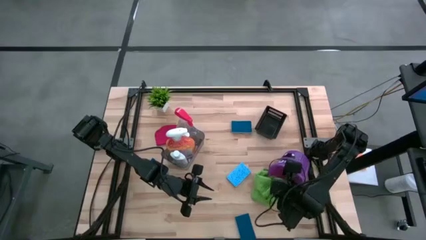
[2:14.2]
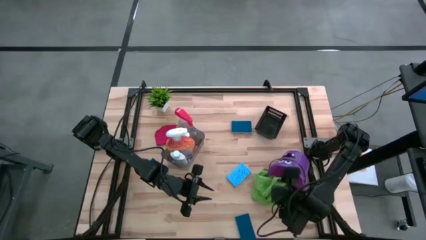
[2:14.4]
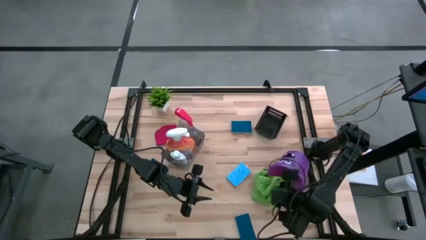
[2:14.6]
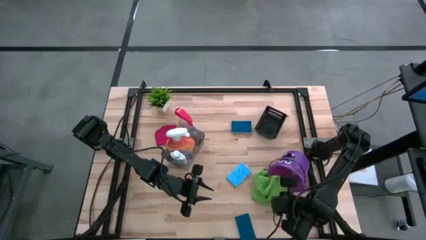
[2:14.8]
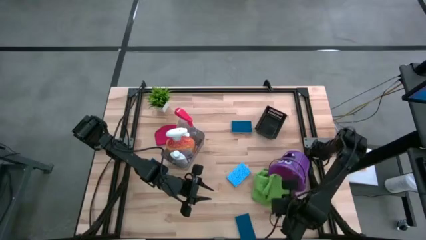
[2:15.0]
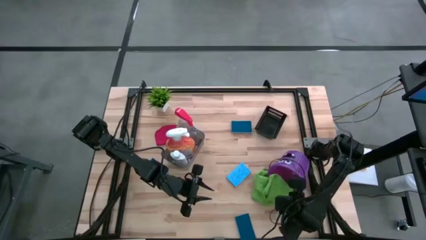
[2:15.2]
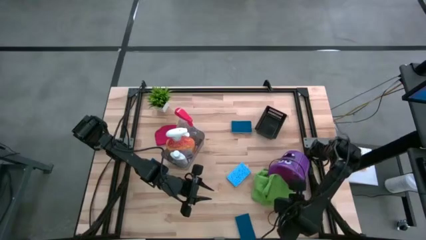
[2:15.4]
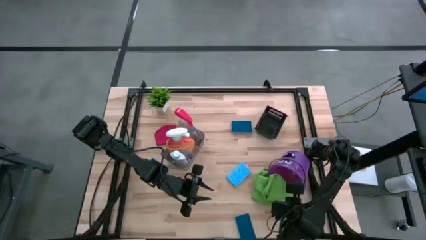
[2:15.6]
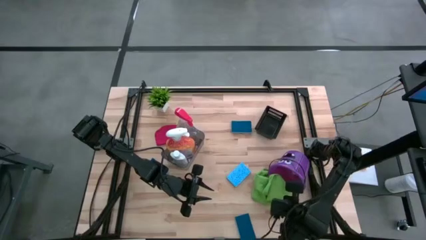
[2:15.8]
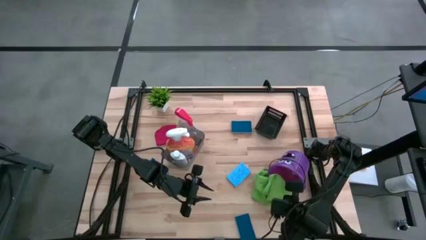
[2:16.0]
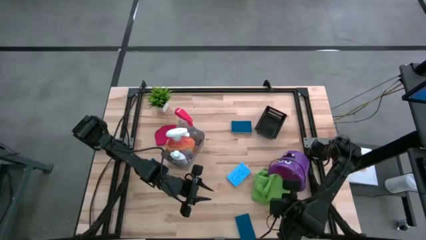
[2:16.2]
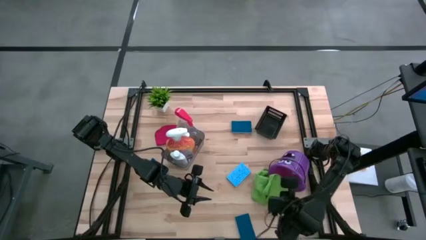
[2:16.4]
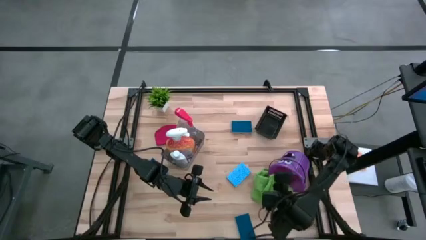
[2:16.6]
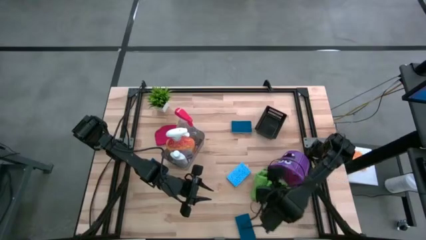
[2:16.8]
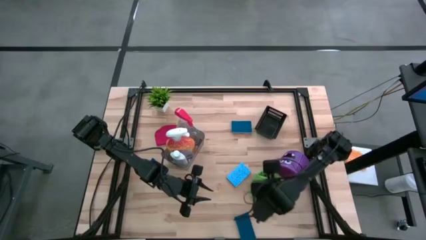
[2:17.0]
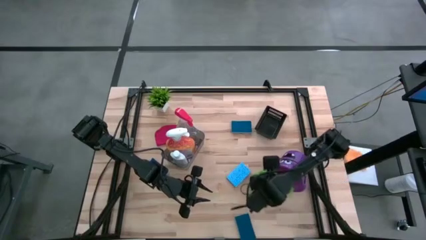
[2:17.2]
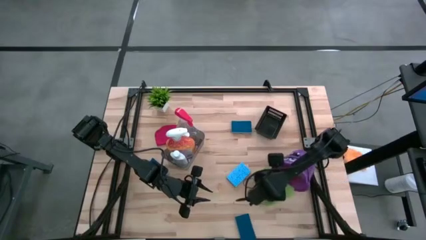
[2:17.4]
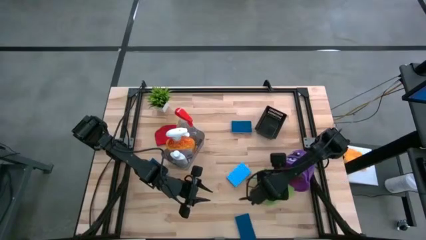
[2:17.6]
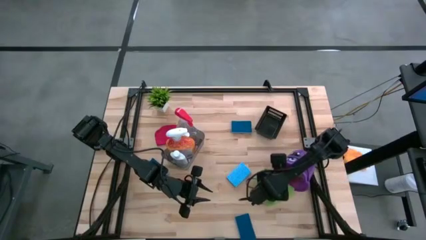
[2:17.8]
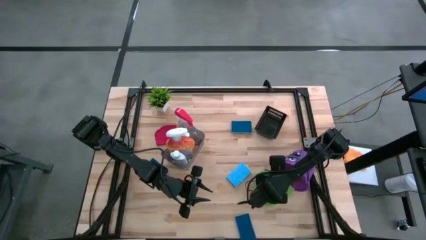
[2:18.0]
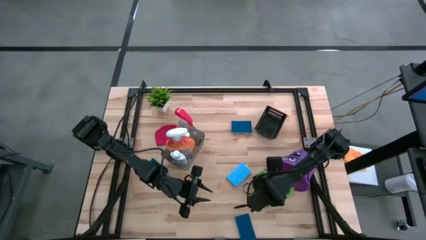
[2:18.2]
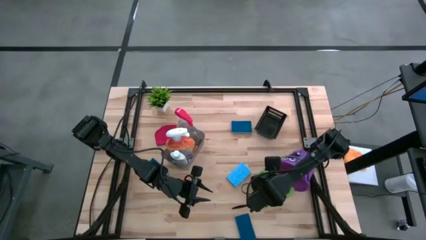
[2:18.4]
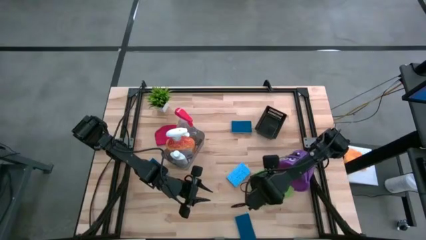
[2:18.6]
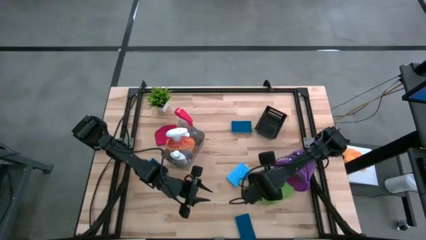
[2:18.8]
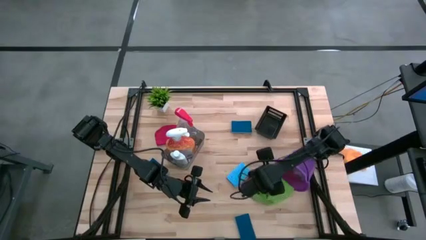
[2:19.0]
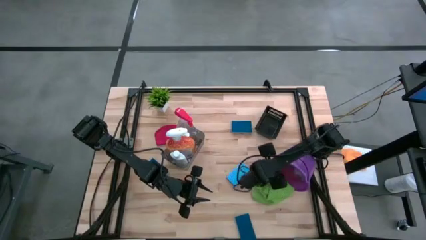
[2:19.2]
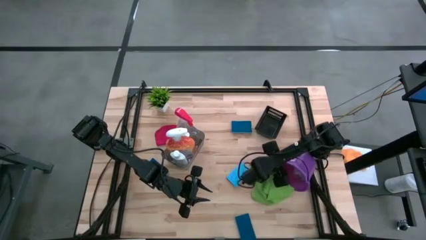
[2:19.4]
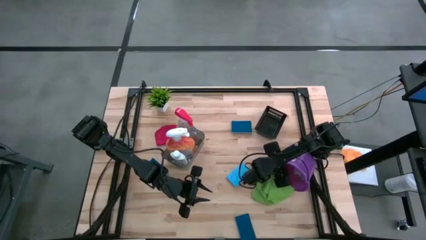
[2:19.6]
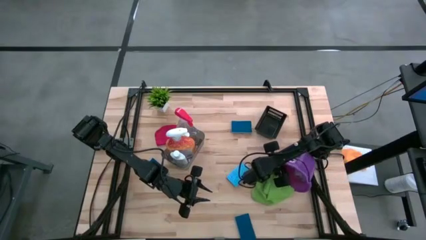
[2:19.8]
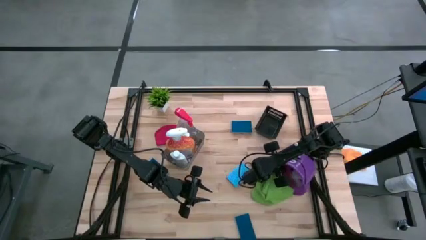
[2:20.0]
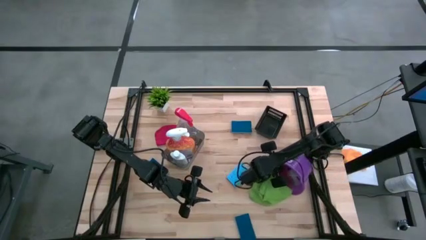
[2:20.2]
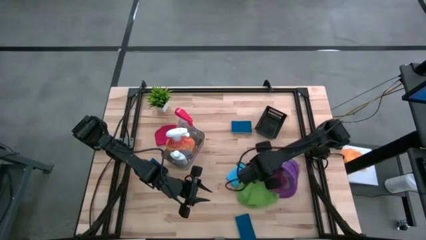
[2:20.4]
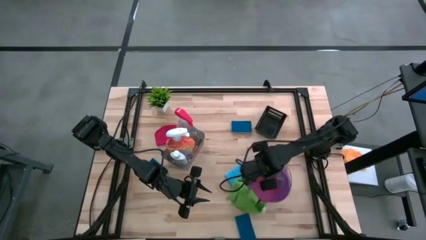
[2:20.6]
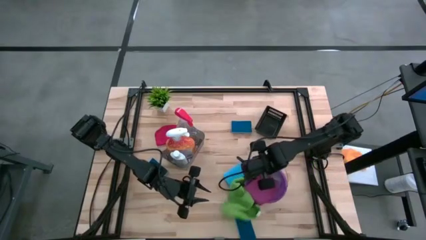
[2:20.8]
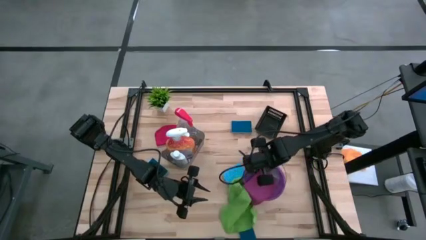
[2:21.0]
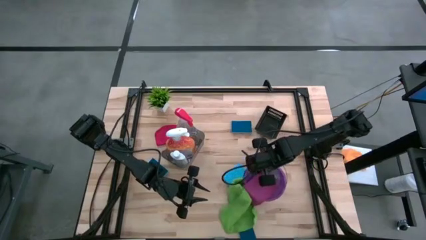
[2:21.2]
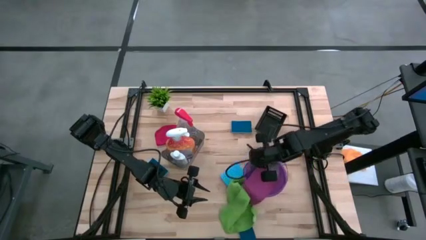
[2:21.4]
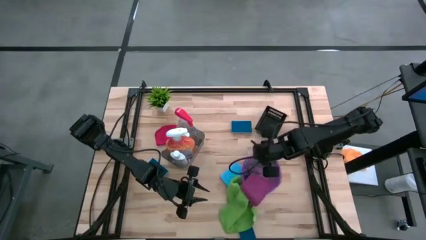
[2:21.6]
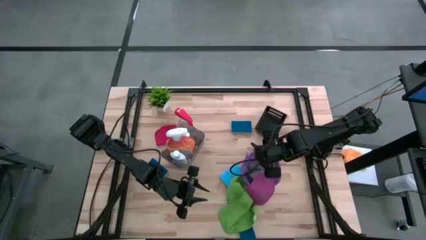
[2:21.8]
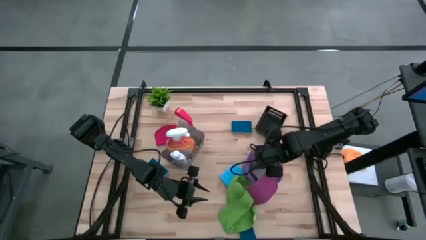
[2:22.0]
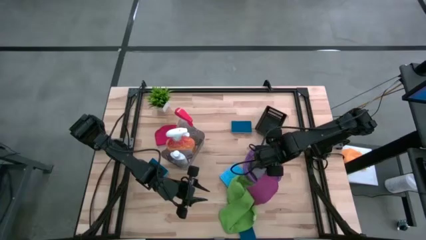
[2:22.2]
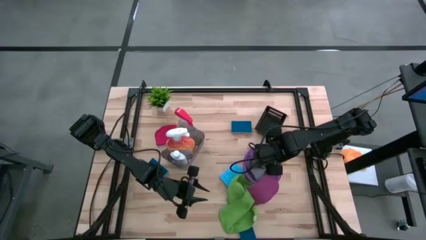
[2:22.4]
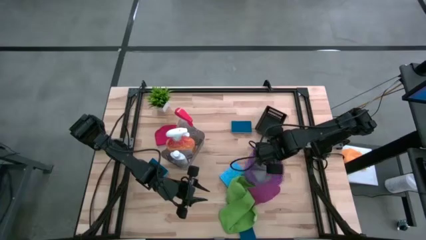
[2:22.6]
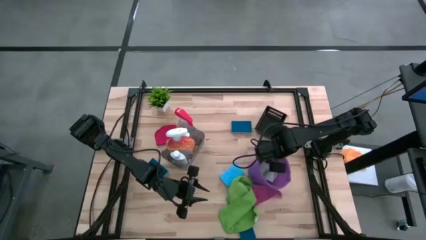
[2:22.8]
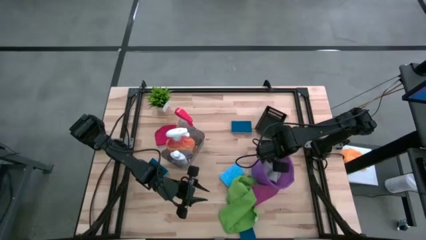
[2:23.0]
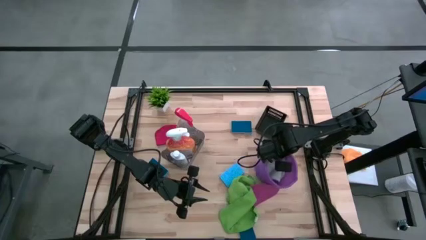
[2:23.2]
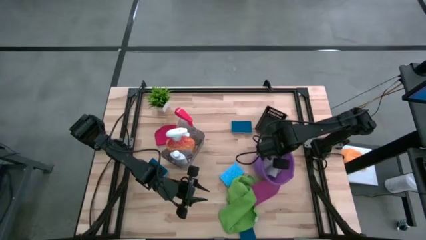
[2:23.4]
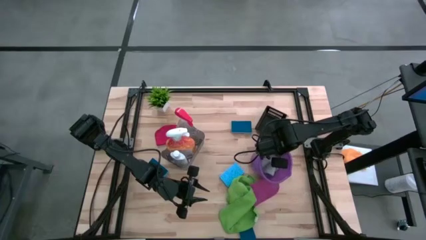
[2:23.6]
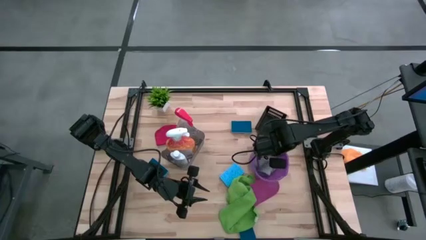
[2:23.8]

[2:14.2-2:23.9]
Task: Pick & Place Kitchen Items
Adjust the purple bucket

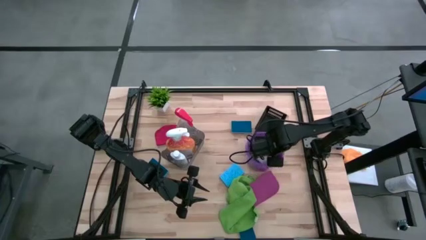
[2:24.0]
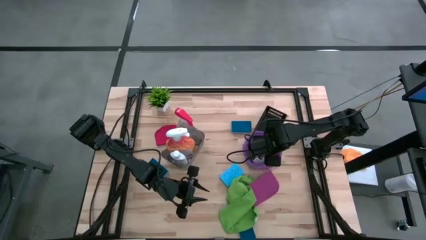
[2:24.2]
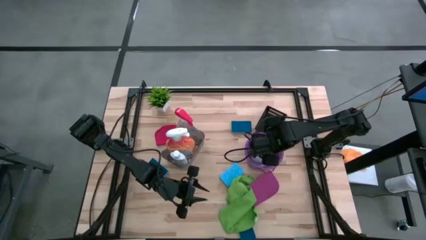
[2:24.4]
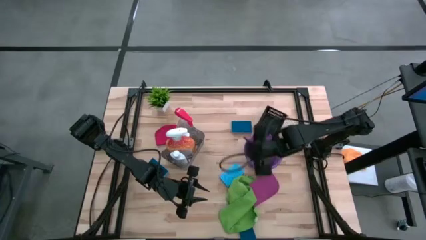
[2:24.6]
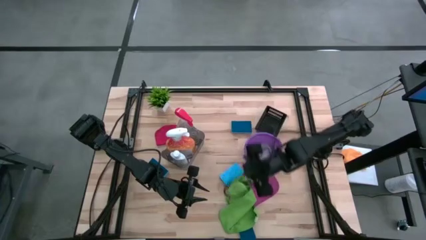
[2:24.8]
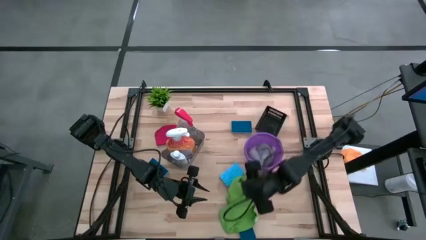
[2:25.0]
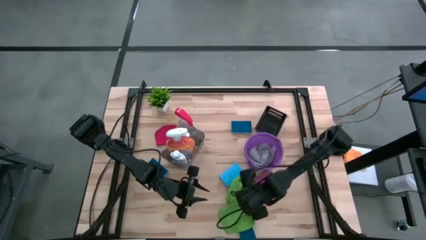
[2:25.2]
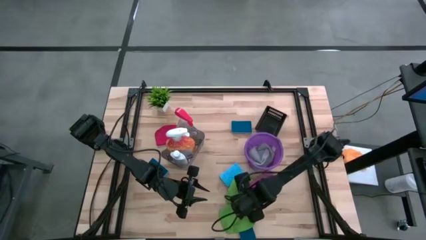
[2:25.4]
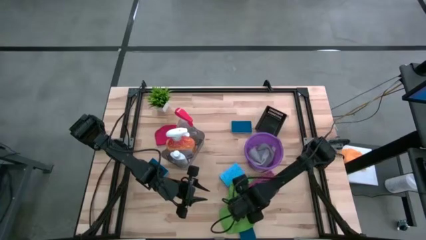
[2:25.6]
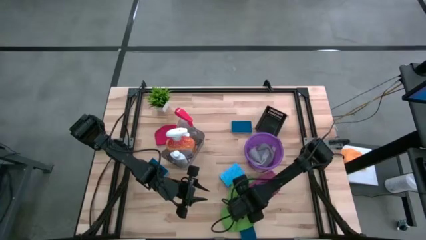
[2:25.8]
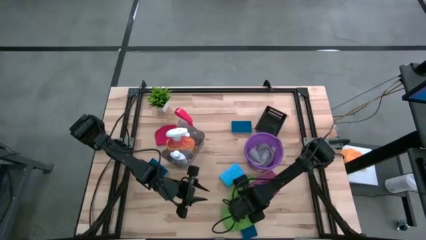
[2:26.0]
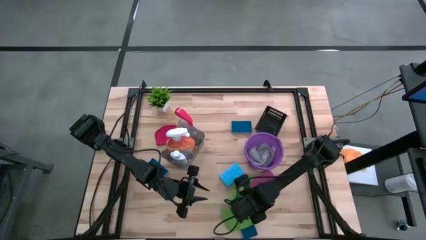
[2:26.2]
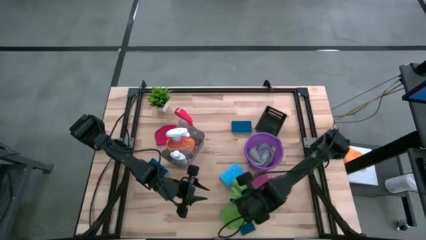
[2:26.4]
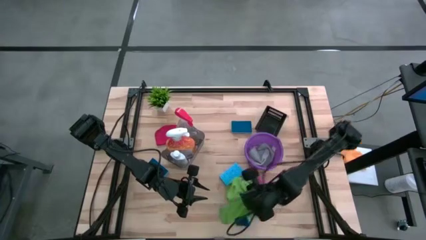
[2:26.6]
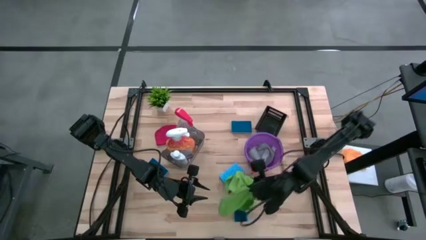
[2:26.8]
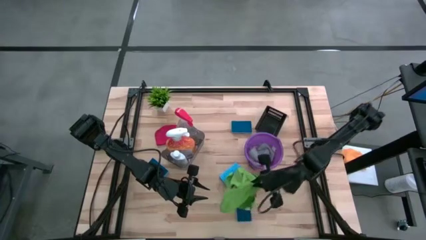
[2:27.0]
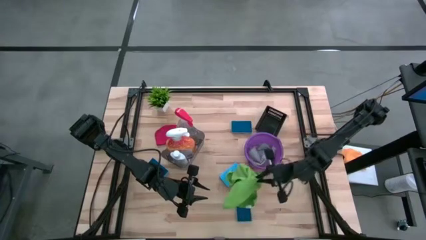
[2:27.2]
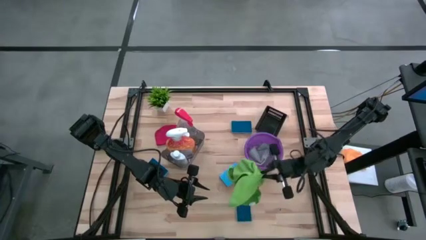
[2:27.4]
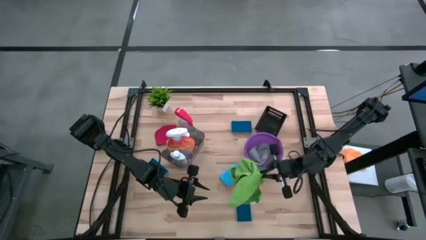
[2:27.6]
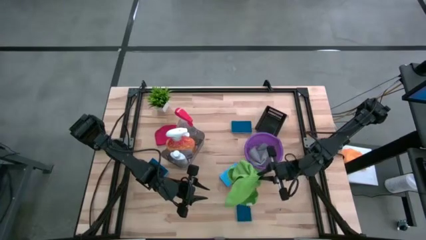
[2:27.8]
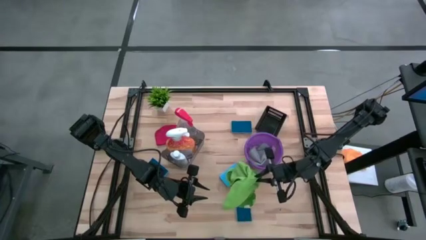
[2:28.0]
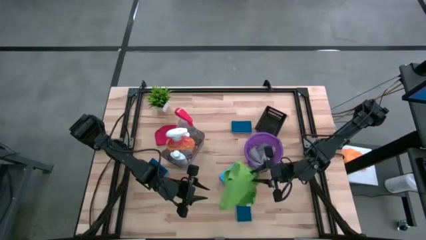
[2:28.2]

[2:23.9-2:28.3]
Put the green microfiber cloth into the purple bucket

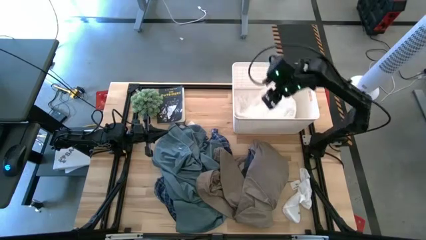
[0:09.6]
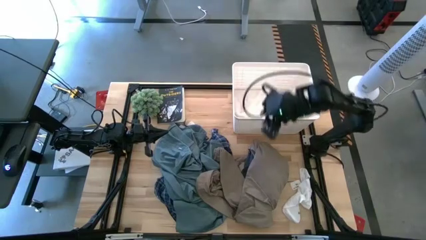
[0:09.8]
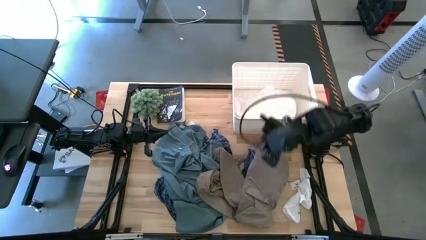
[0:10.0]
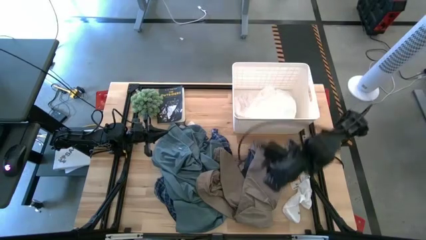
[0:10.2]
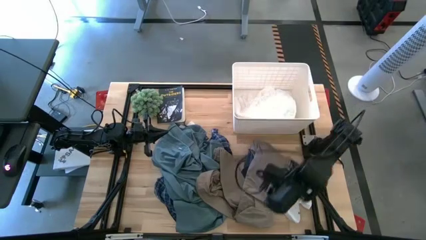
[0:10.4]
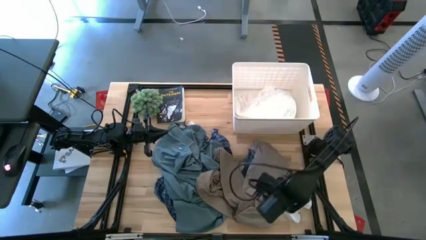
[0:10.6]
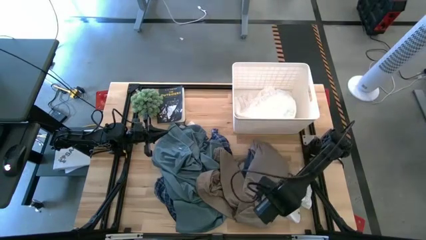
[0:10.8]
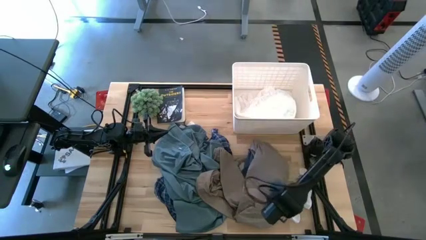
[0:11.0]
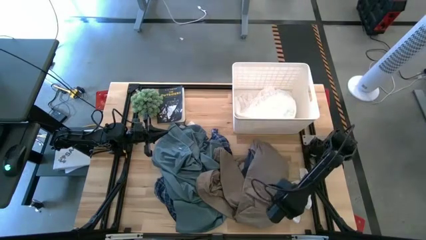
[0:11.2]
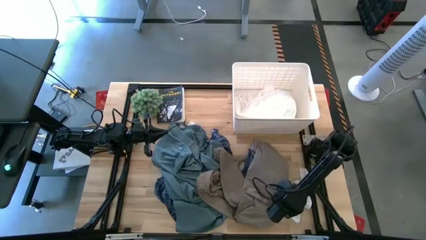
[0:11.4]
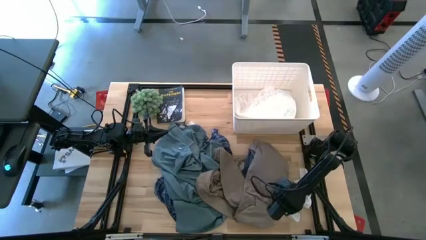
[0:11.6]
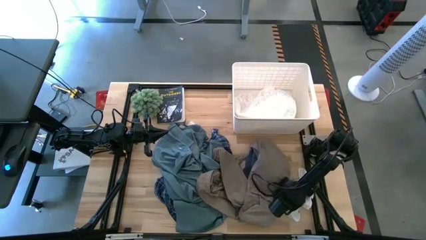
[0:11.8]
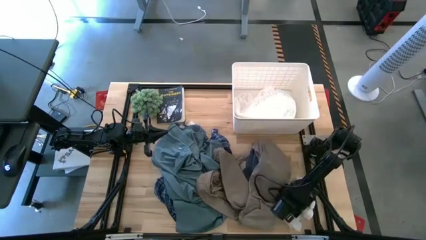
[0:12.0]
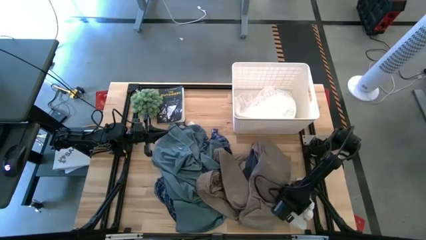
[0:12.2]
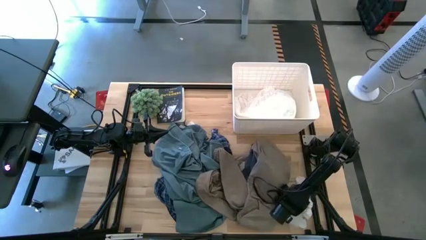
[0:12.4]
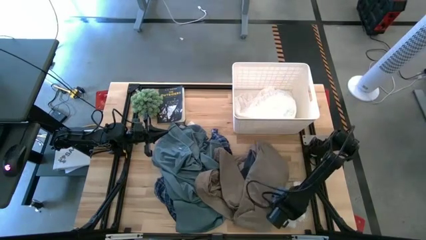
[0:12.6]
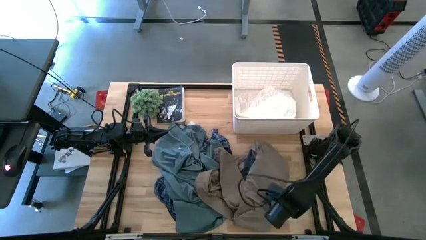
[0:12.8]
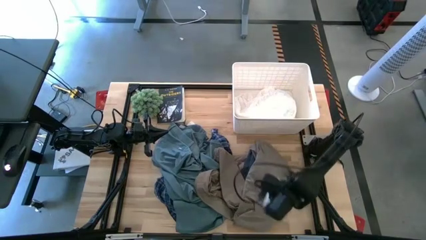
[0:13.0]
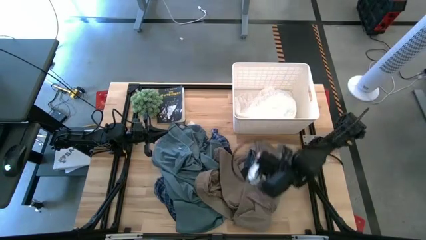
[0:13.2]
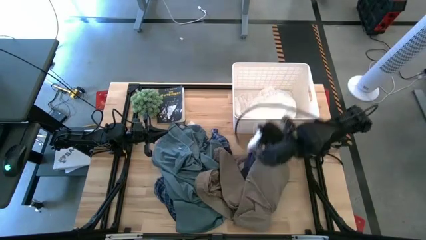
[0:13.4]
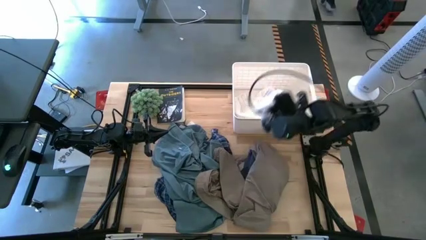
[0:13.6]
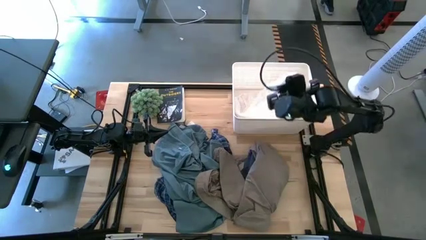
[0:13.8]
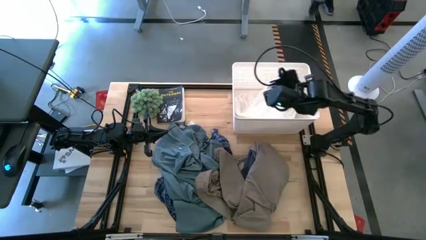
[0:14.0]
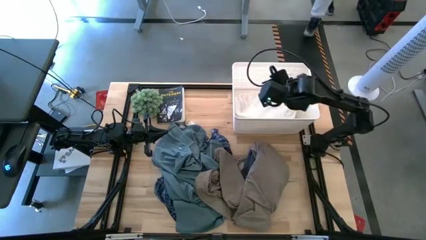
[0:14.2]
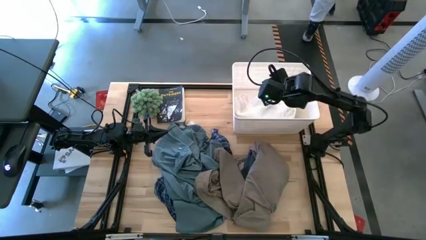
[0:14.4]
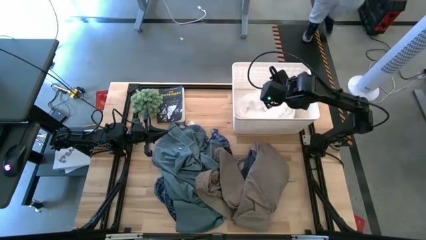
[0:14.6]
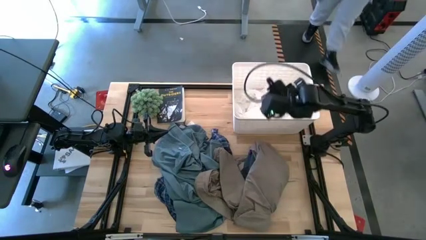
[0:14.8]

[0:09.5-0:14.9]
Task: Sort clothes
Put the white socks into the white laundry organizer
